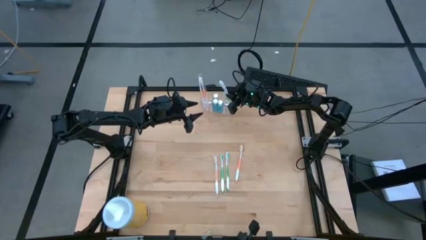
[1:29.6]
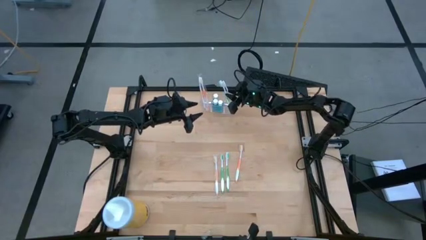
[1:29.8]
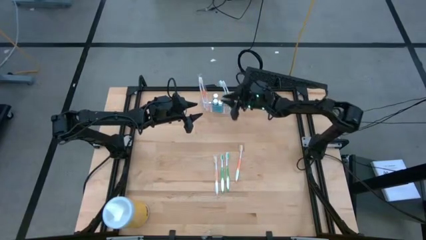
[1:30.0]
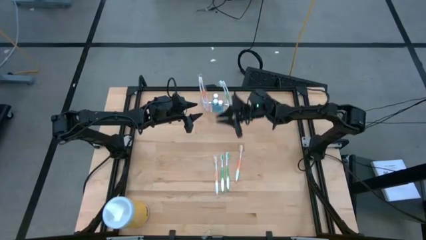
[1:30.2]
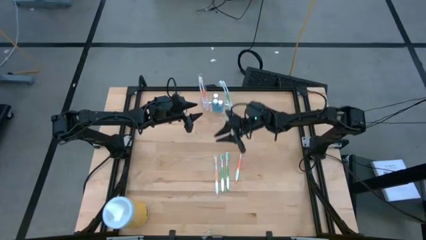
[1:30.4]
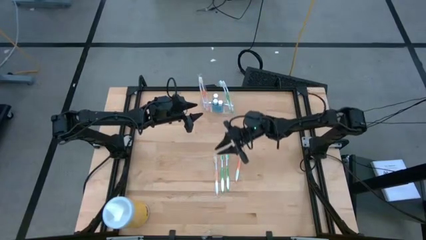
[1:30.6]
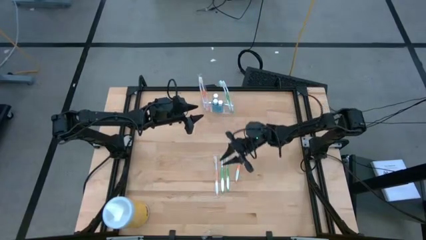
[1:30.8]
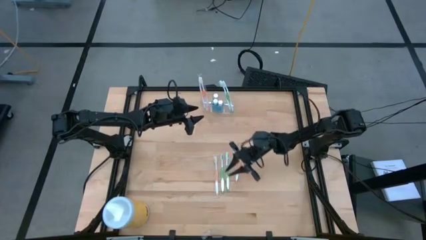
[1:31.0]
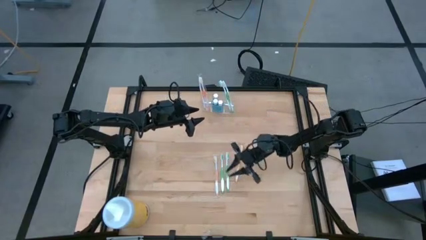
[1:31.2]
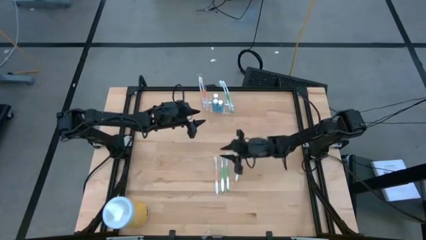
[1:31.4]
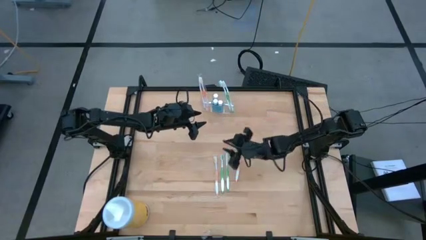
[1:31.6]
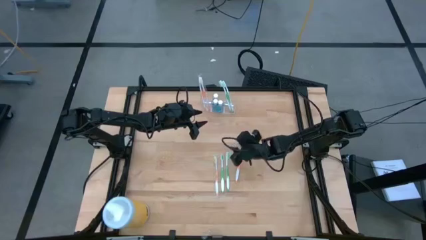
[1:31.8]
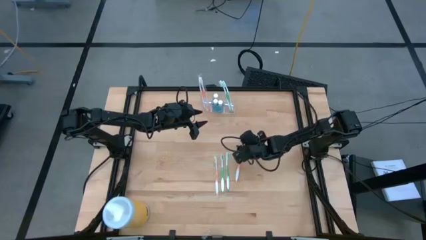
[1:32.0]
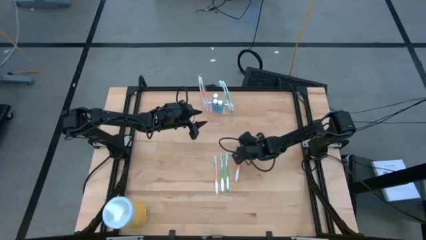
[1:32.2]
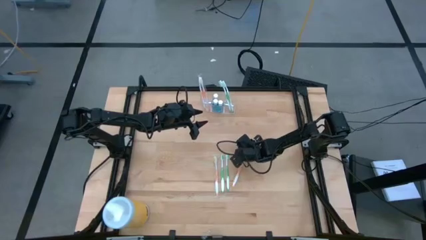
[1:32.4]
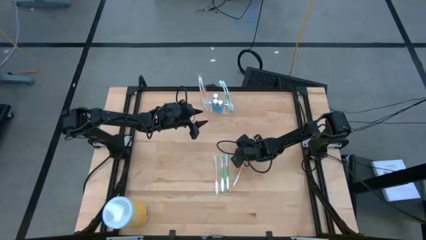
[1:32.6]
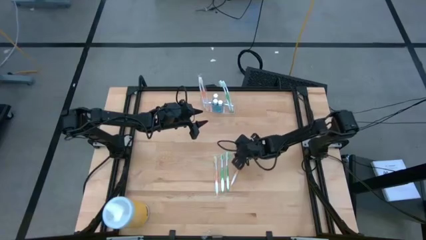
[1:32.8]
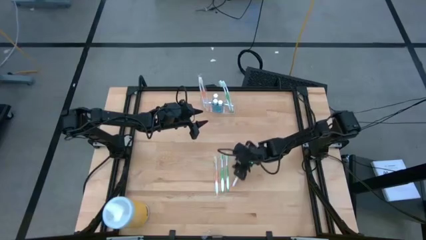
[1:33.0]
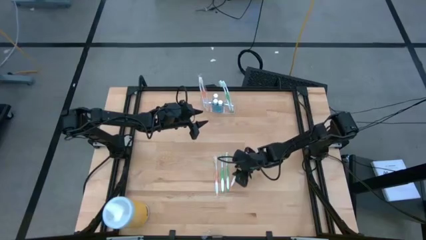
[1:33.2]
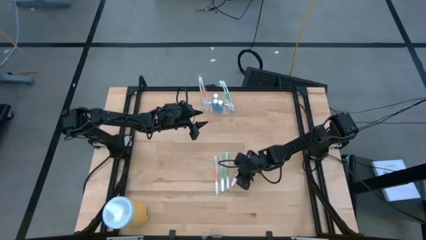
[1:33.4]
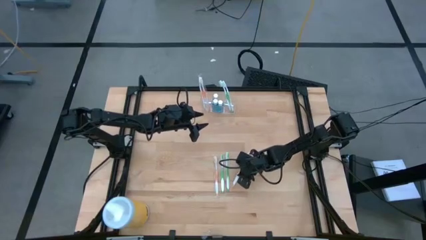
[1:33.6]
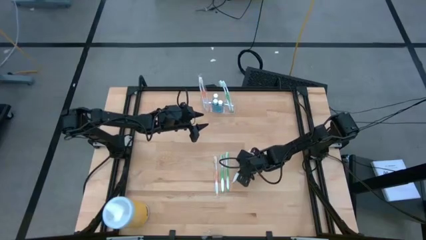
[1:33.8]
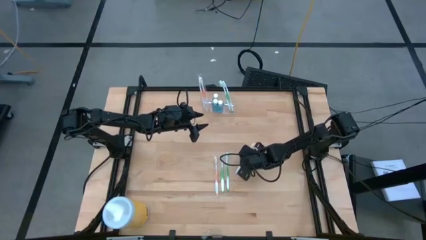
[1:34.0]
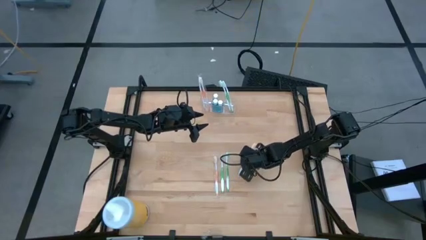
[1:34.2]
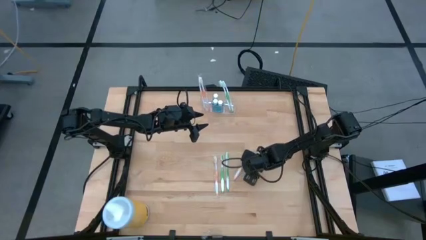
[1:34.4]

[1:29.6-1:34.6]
Task: Pick & Place toothbrushing station
Put the orange toothbrush into the transparent organizer

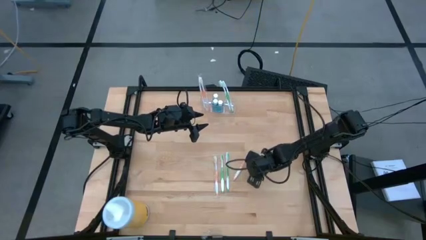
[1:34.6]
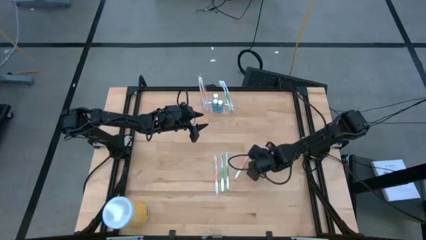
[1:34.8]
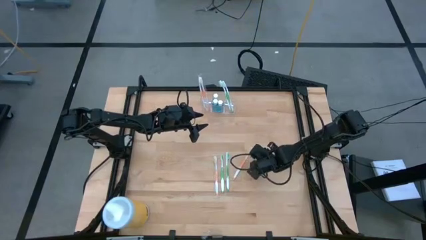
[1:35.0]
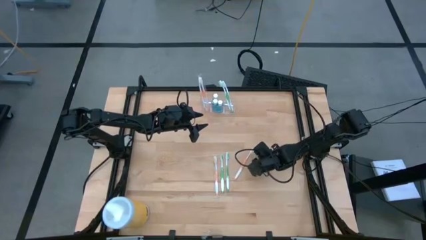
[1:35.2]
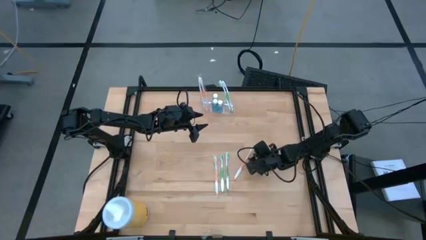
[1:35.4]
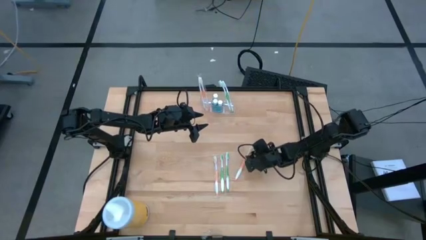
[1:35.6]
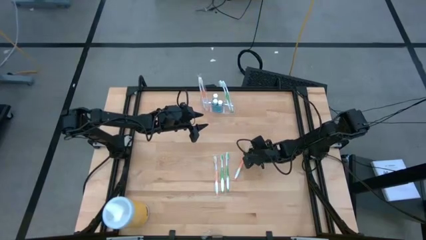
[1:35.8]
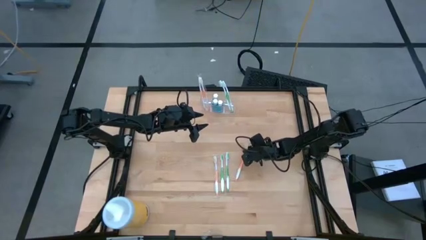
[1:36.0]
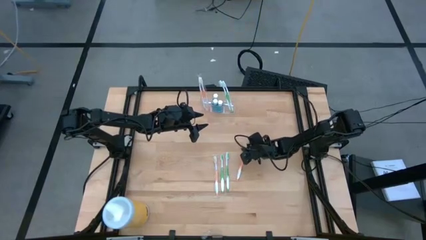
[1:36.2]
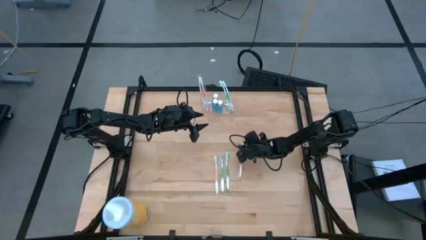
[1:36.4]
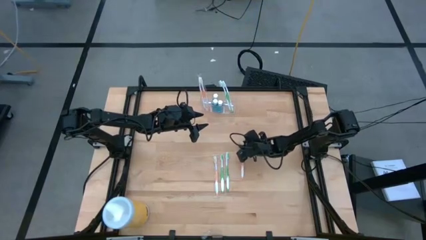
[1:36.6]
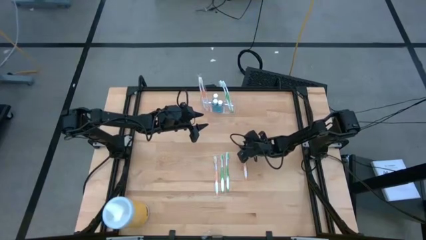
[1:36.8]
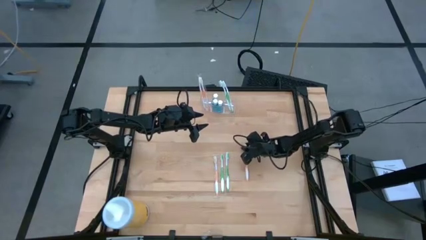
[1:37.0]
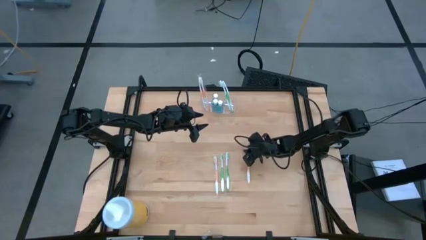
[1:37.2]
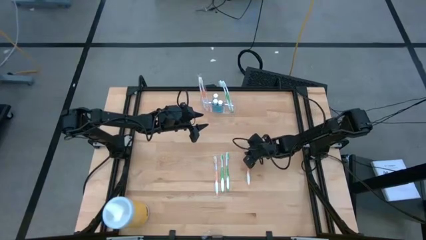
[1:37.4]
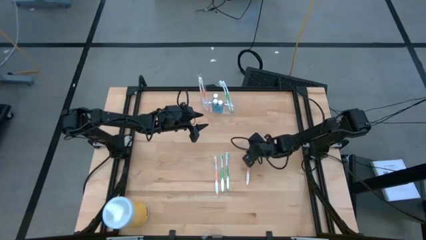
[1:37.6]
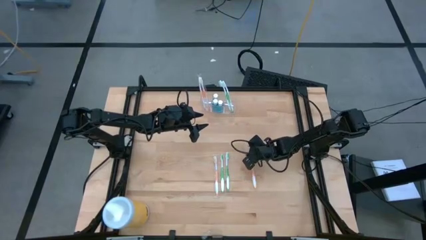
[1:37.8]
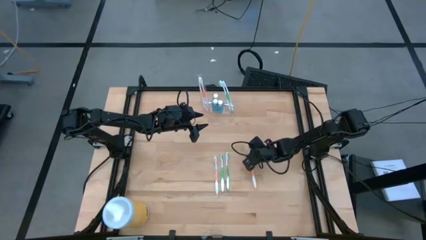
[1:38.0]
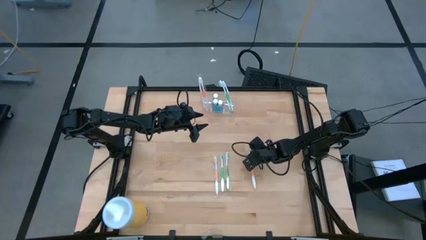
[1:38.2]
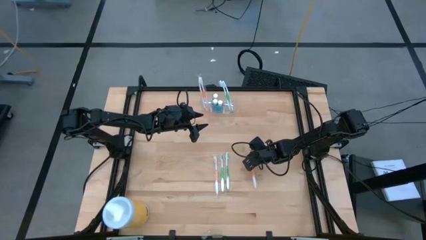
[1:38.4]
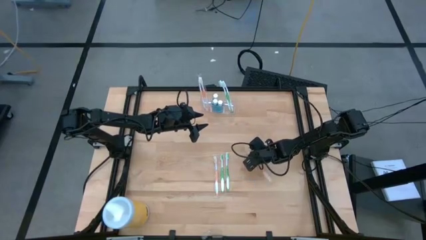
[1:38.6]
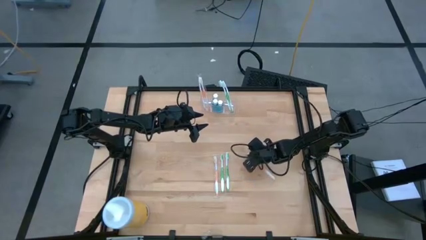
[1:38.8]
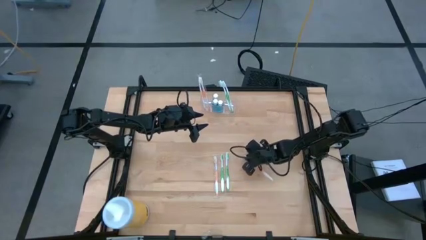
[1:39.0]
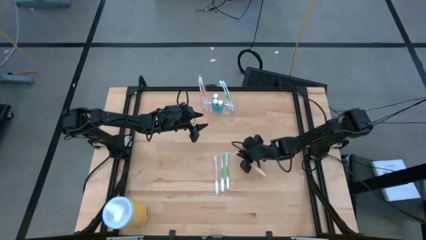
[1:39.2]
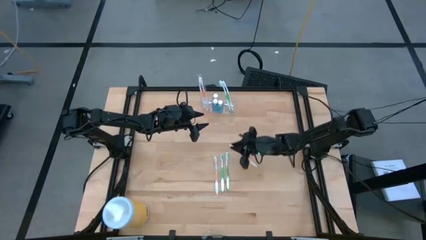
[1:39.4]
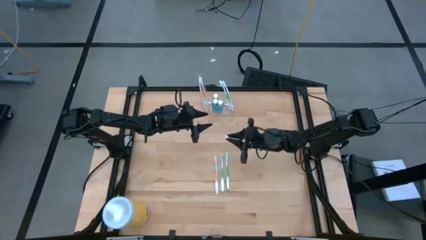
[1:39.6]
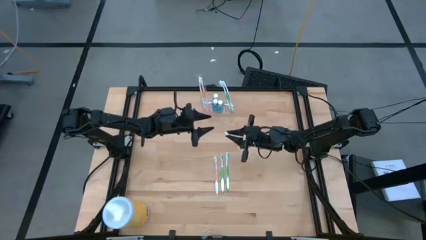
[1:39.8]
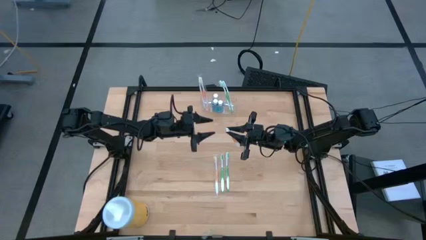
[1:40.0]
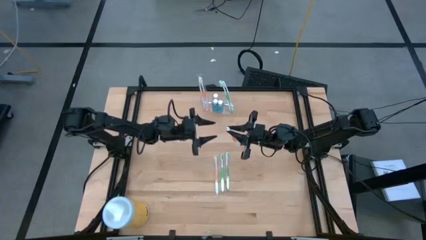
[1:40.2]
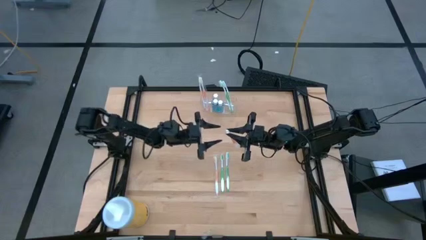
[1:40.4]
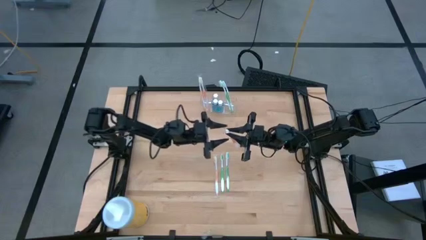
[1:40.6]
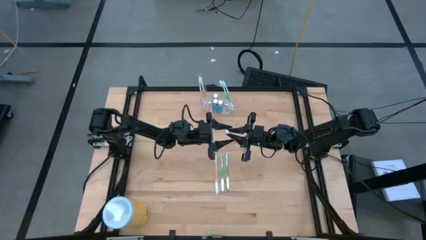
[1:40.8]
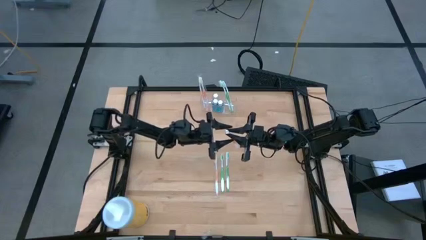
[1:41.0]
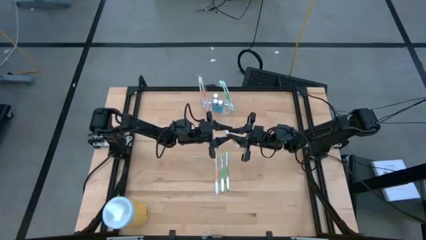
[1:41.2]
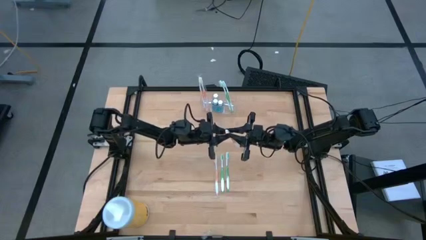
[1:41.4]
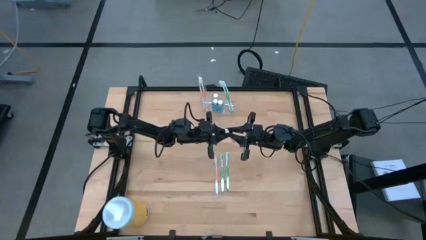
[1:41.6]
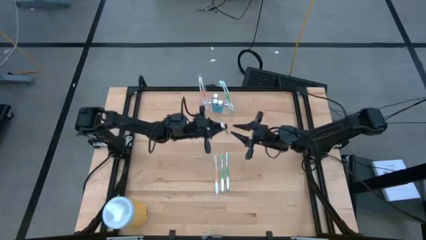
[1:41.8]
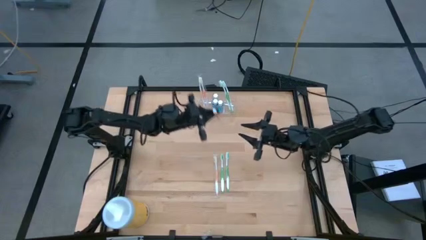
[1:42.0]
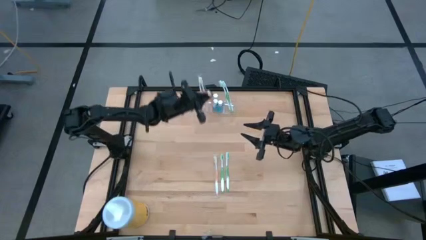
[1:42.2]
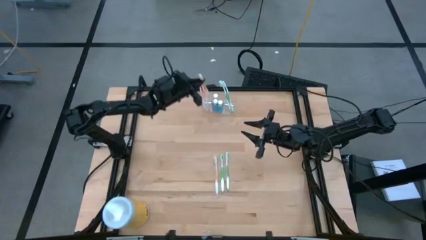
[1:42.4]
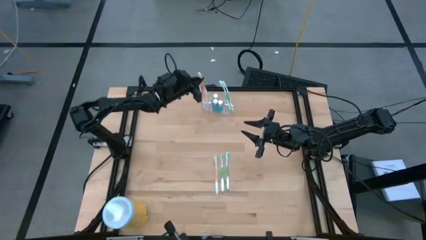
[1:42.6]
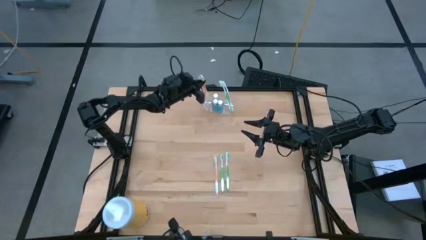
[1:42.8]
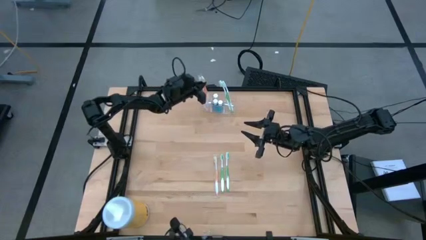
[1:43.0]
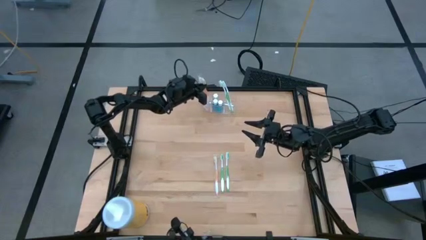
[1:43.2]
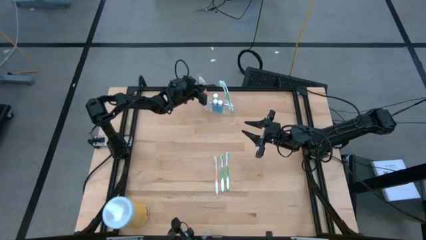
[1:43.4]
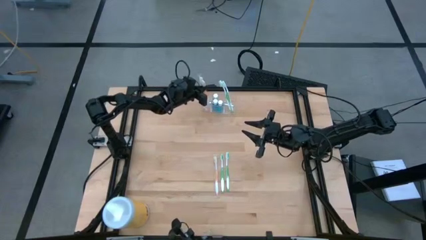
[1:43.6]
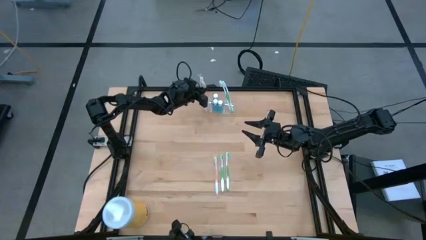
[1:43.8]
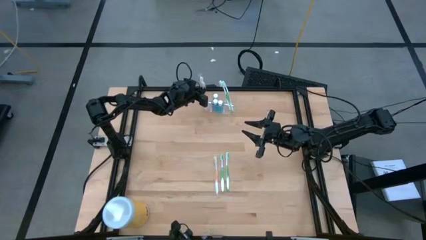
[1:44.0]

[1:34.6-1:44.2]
Put the orange toothbrush into the transparent organizer
